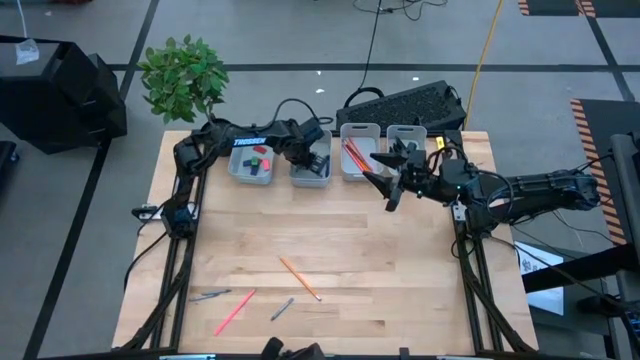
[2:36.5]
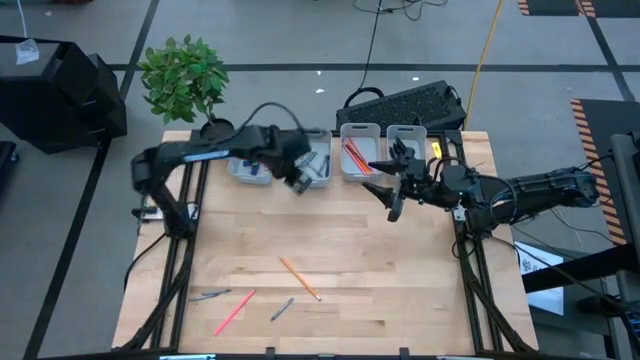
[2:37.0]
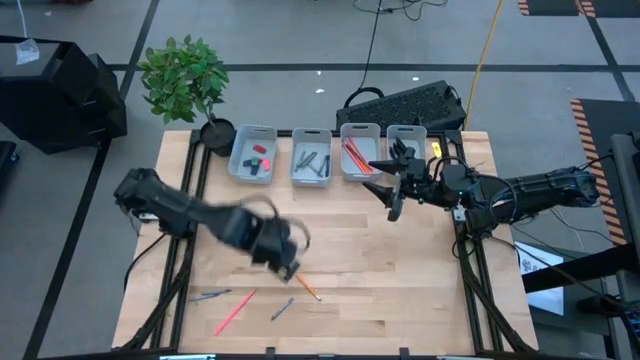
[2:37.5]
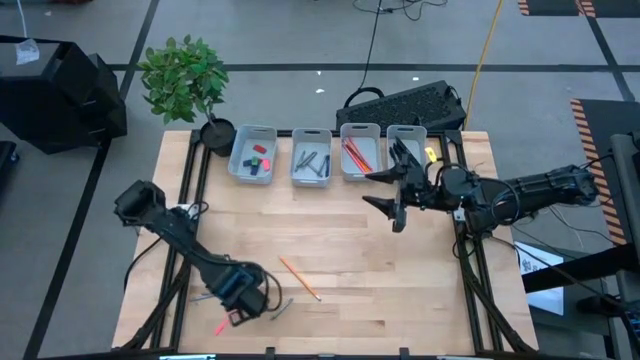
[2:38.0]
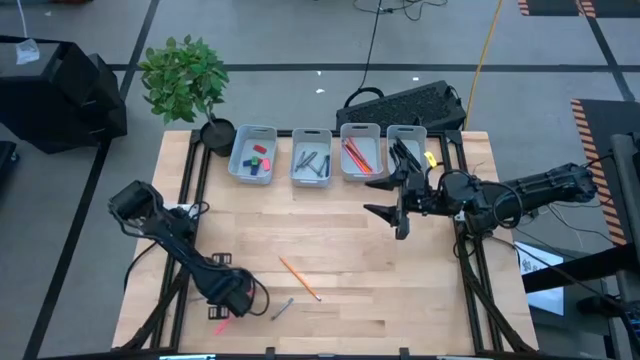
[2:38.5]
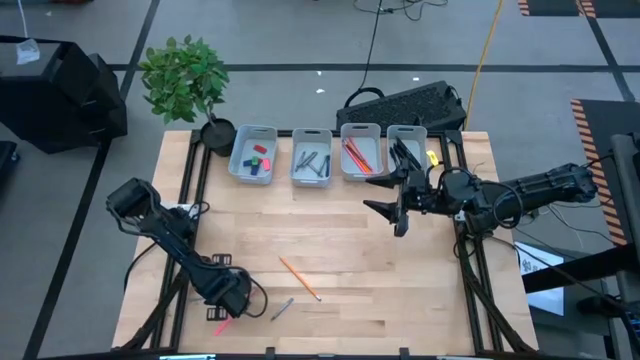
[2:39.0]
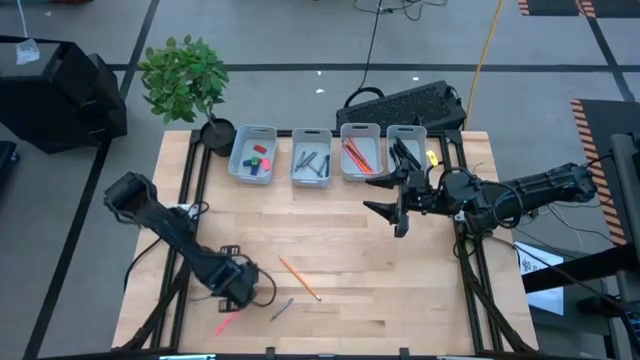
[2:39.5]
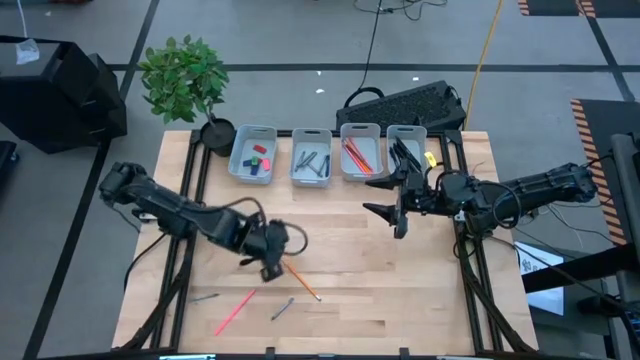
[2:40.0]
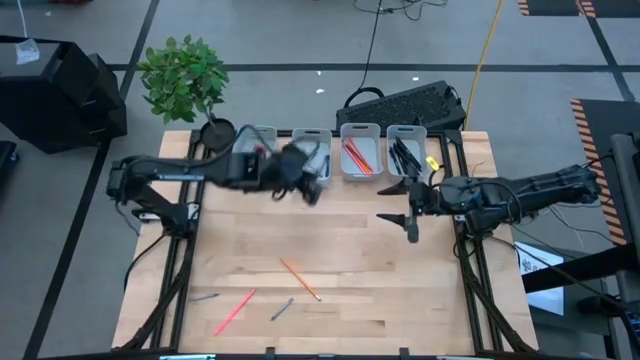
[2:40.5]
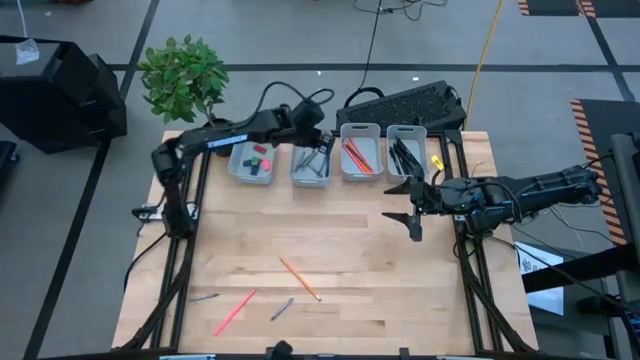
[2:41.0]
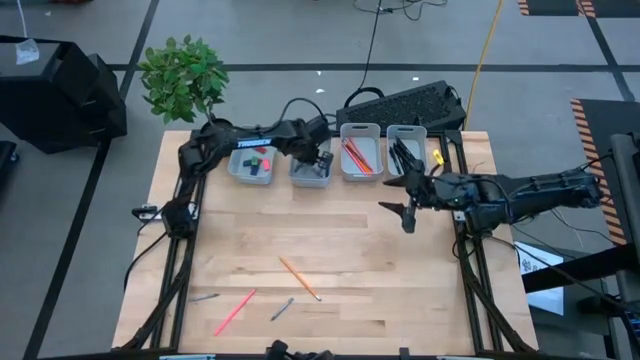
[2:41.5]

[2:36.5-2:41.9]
Task: Sort crayons/erasers/pens/pencils in bins
Put the gray crayon into the middle left gray bin

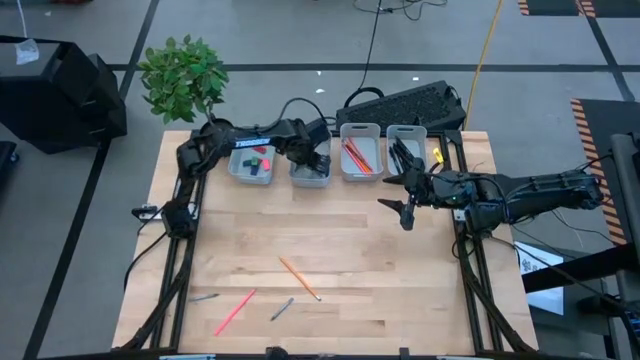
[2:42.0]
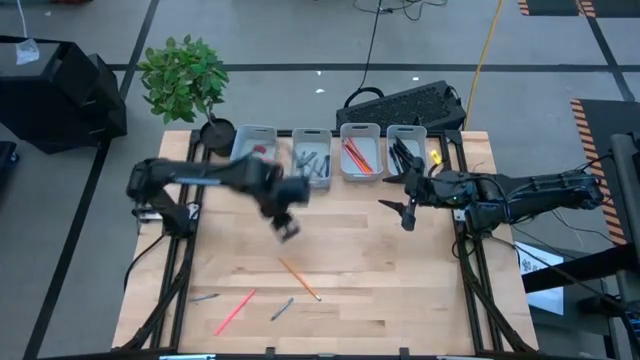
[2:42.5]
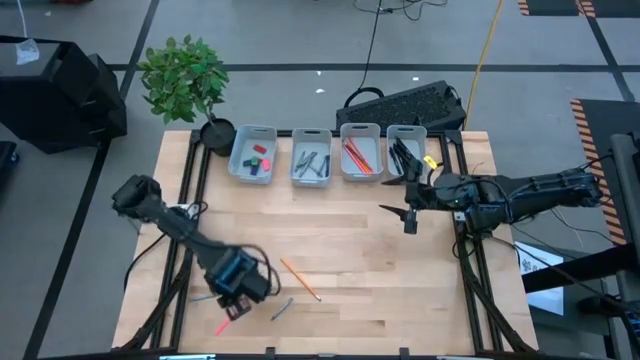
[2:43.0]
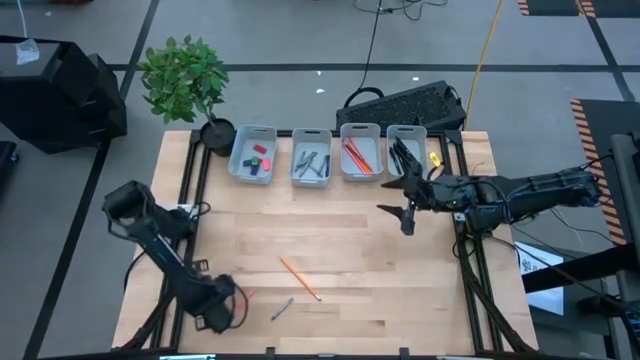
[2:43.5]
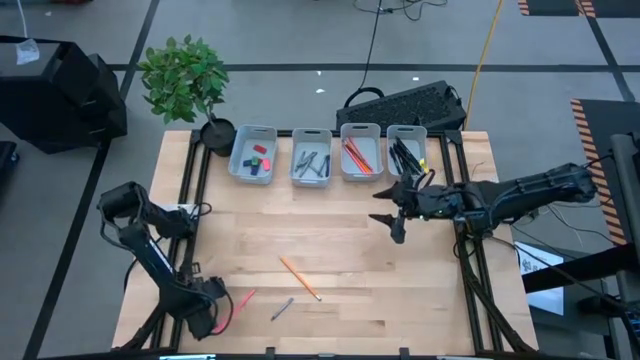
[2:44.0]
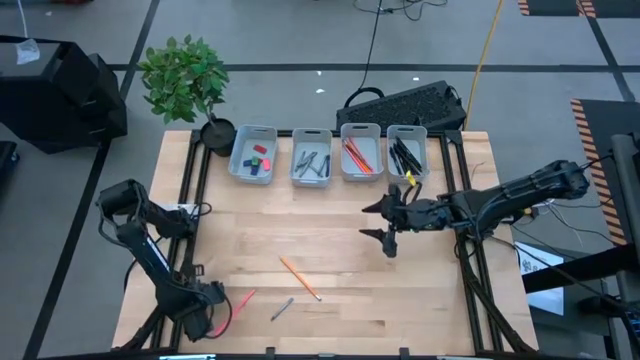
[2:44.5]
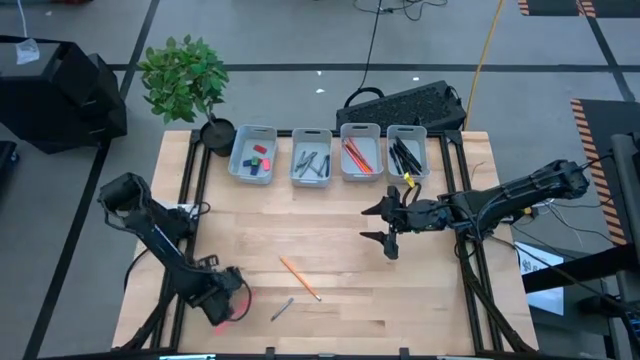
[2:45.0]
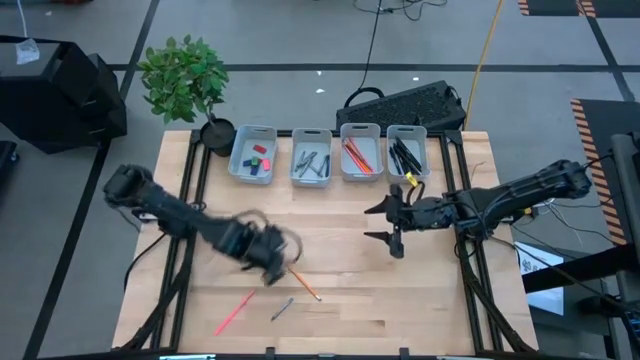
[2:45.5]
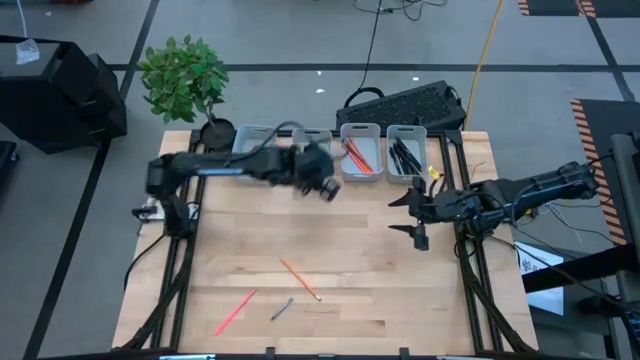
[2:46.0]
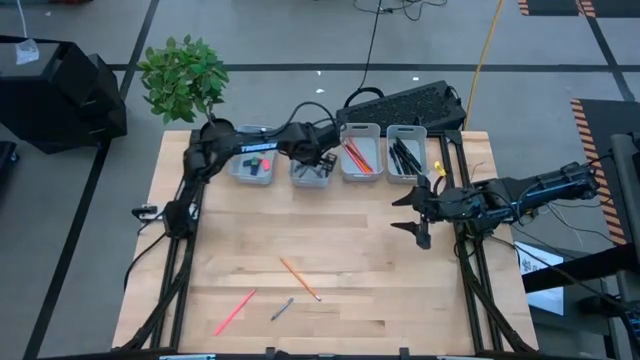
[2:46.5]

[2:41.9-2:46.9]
Put the gray crayon into the middle left gray bin

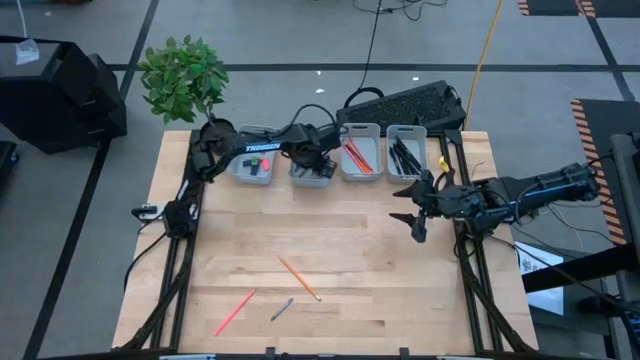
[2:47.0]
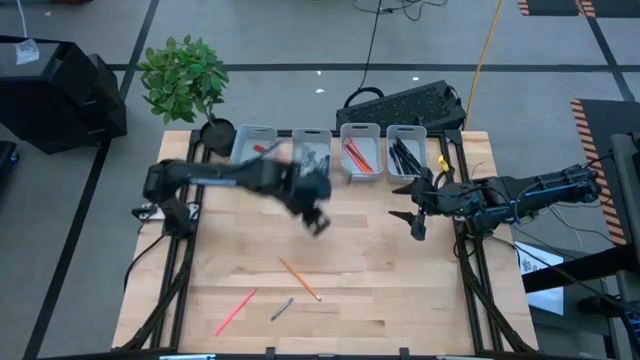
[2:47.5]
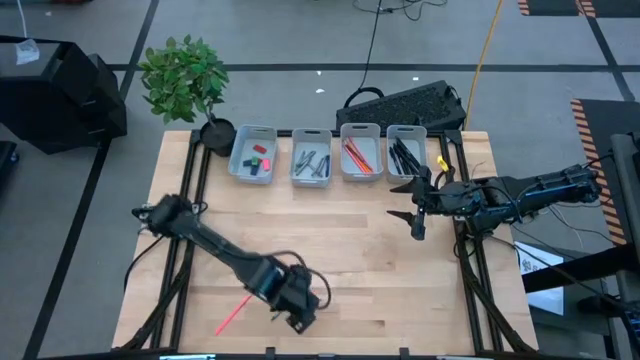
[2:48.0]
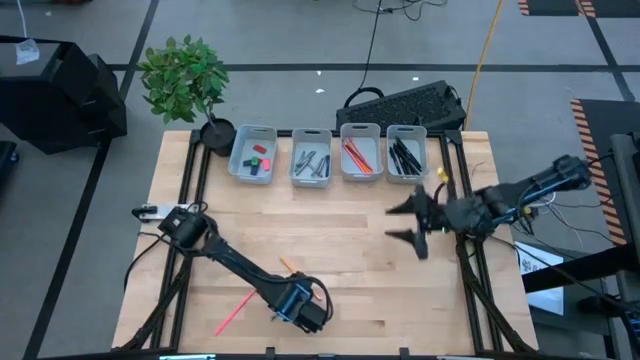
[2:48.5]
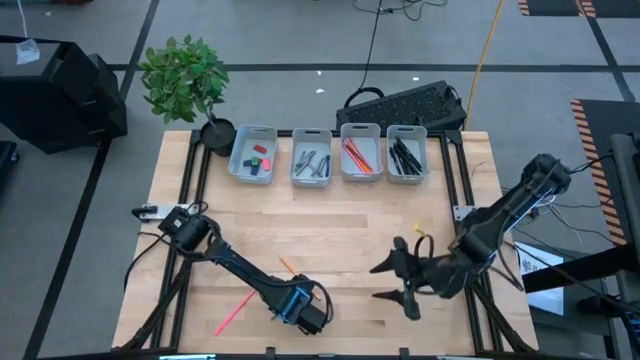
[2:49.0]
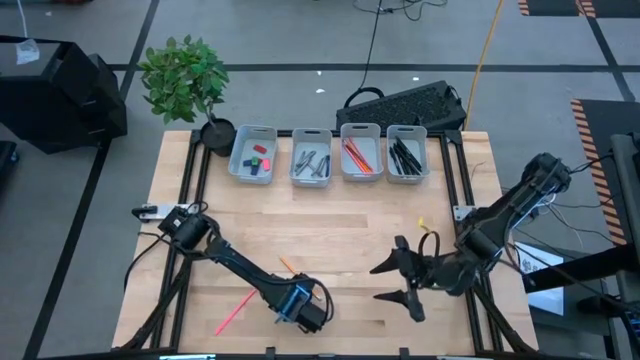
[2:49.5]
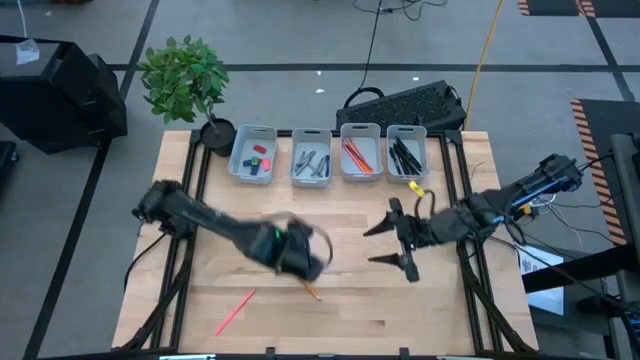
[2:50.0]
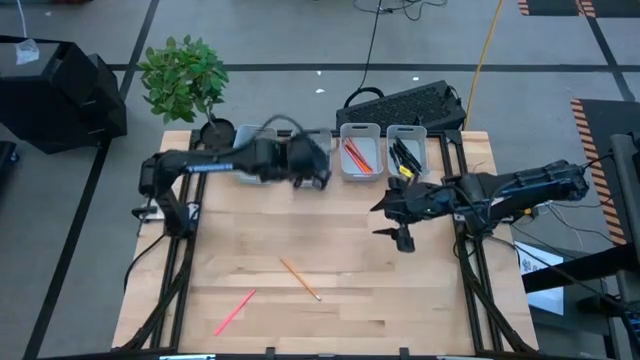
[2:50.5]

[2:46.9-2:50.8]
Put the gray crayon into the middle left gray bin

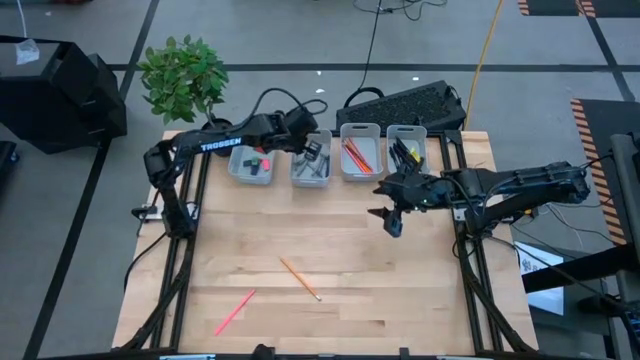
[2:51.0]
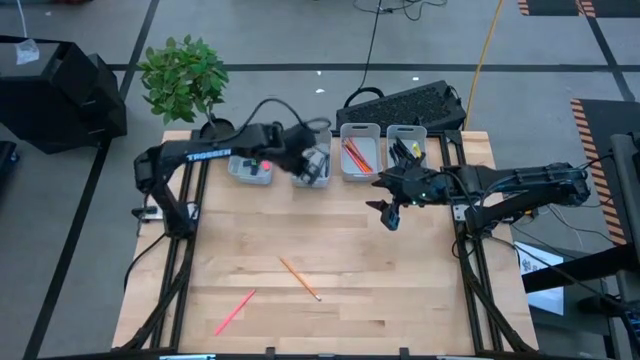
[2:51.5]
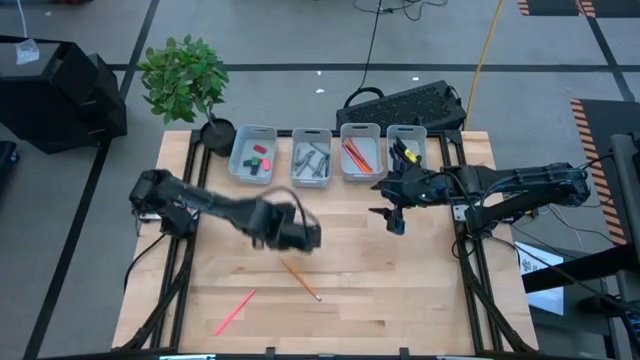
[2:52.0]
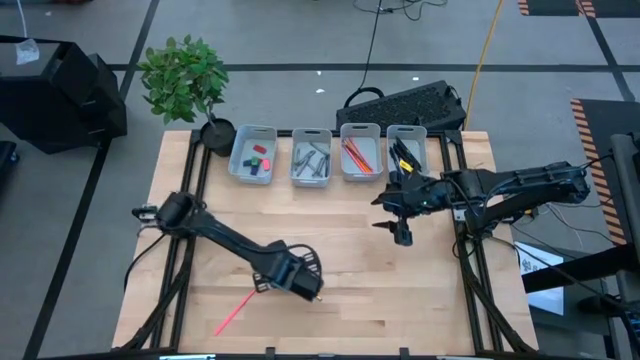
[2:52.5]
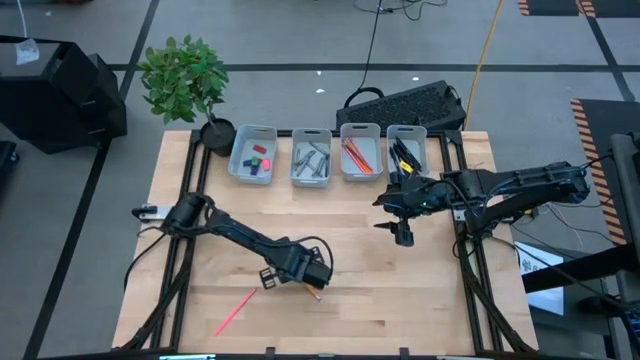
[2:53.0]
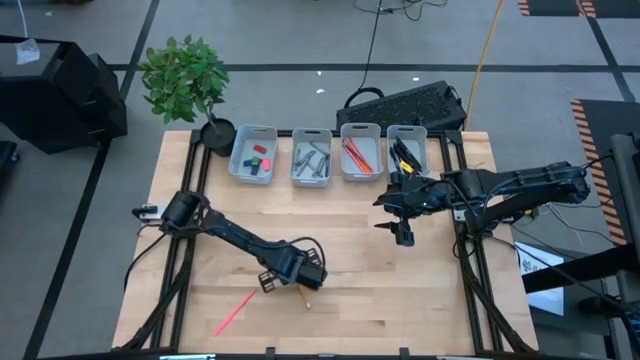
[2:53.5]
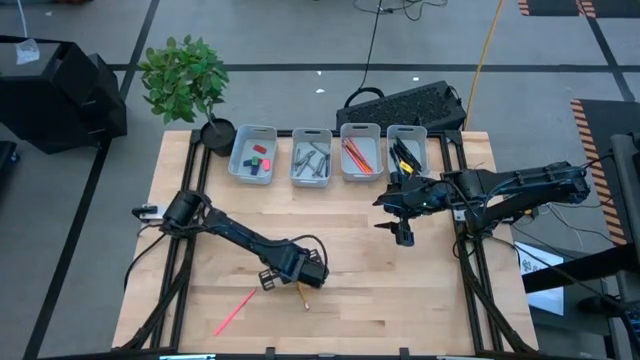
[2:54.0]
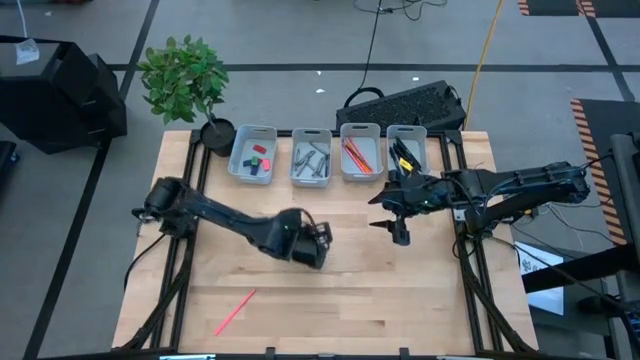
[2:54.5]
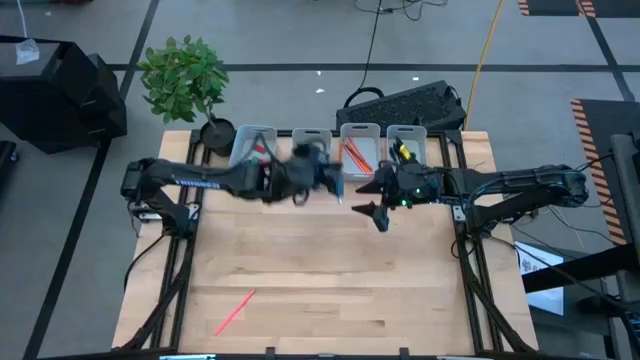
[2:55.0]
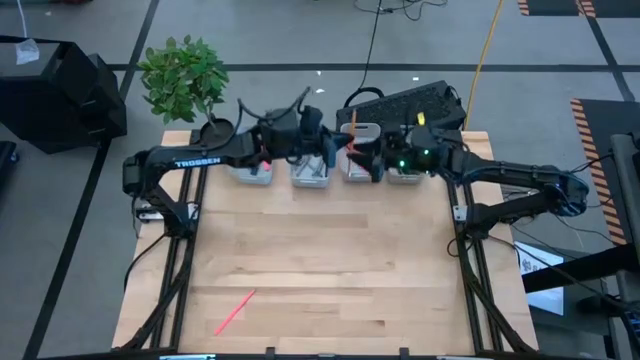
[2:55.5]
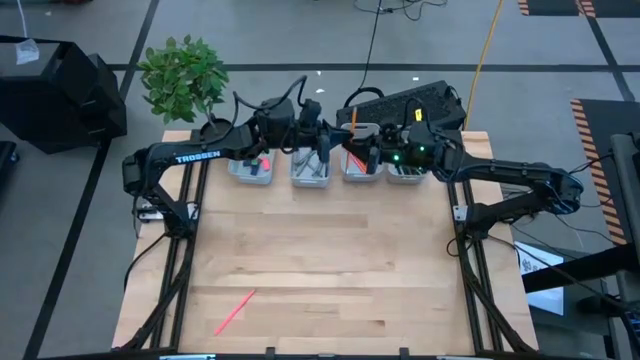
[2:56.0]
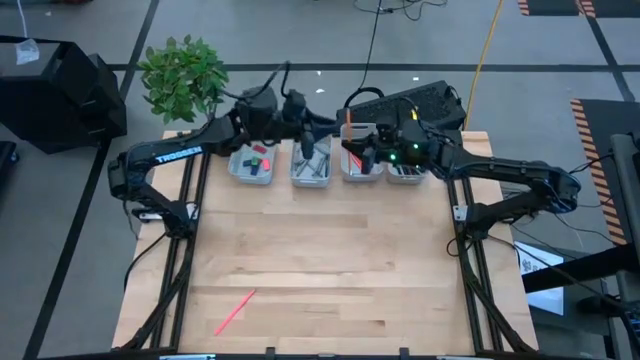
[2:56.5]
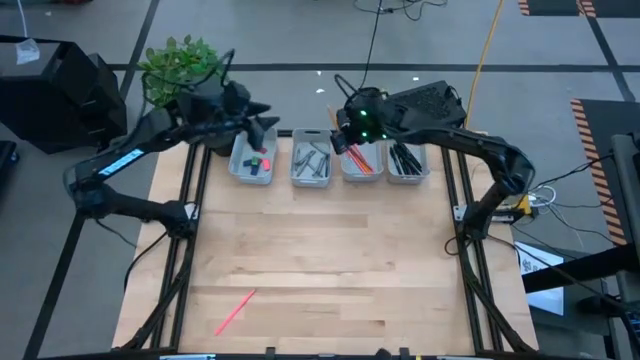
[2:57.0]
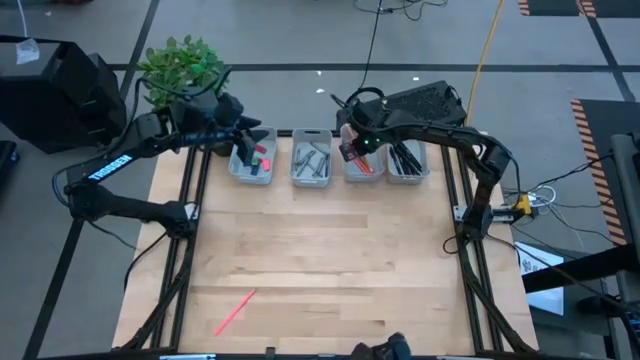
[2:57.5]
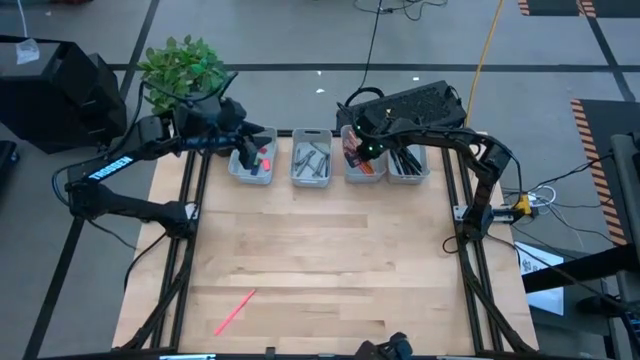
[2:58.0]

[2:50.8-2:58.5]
Put the orange pencil into the middle right gray bin
